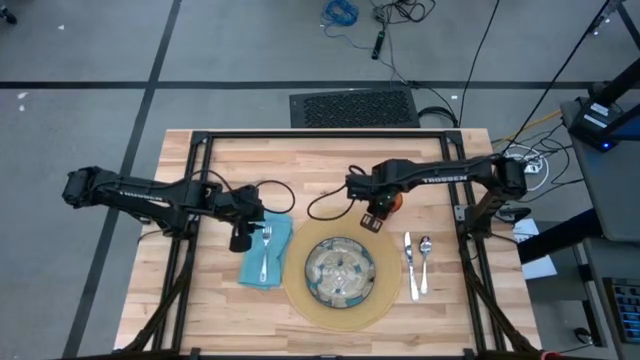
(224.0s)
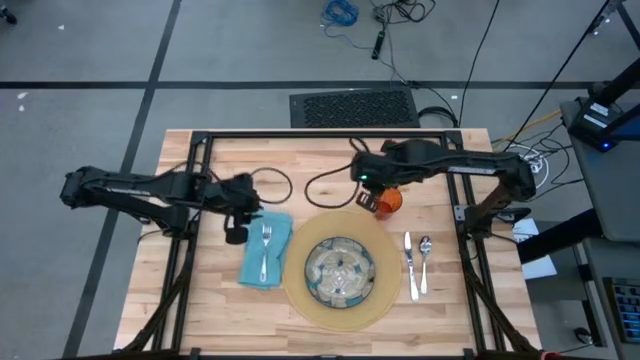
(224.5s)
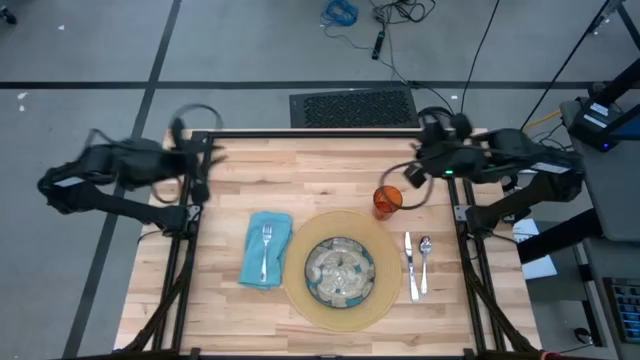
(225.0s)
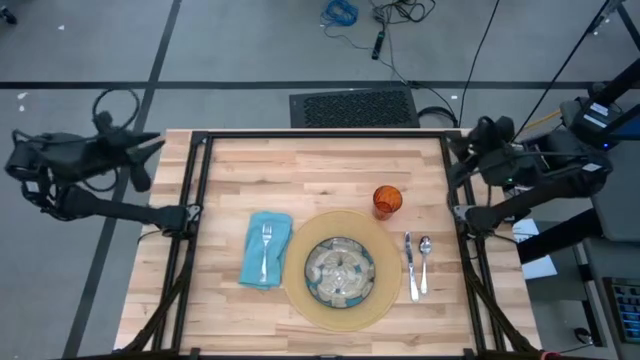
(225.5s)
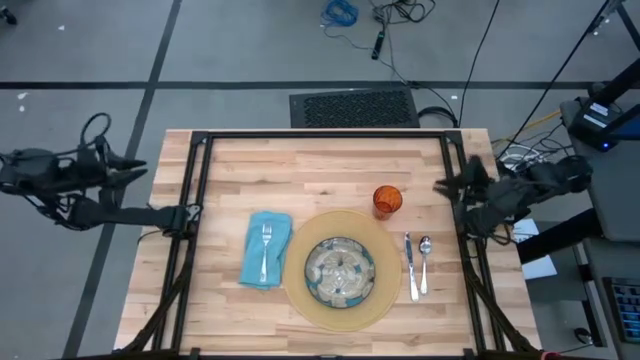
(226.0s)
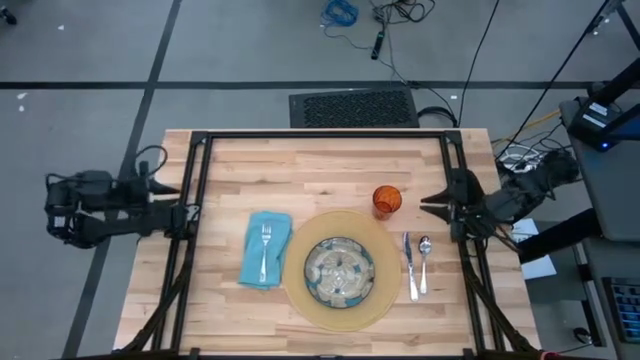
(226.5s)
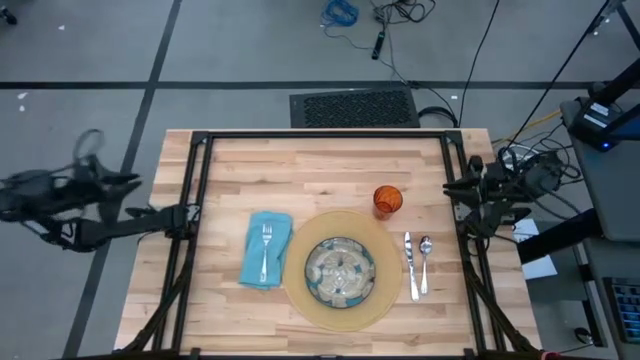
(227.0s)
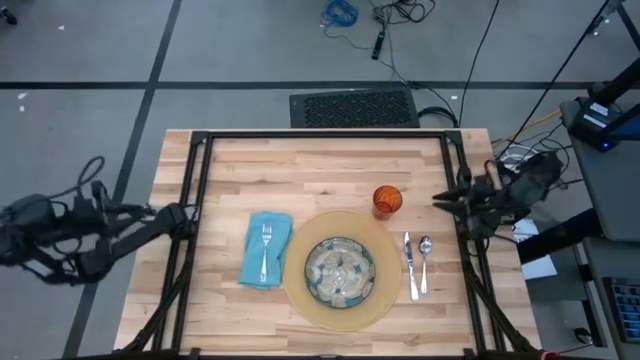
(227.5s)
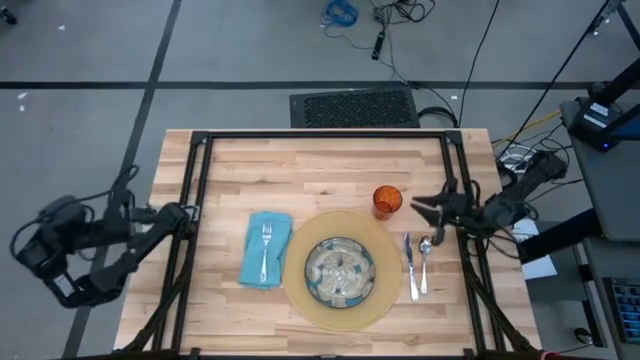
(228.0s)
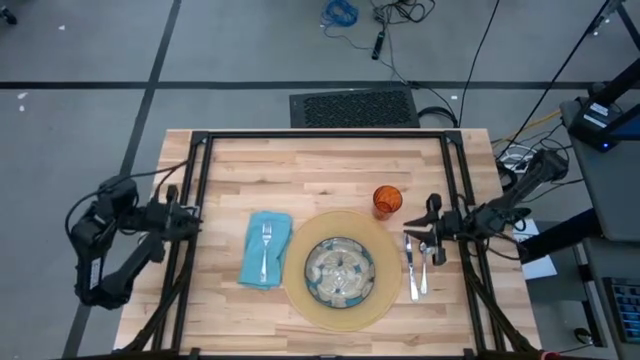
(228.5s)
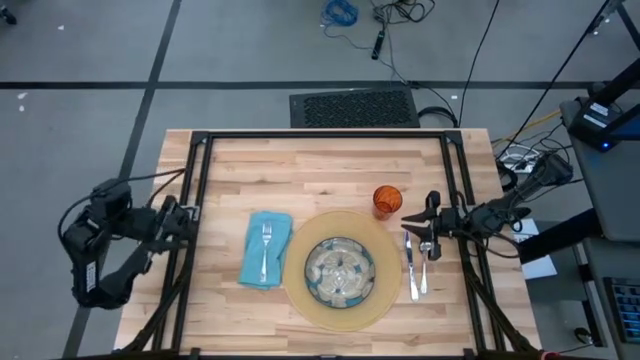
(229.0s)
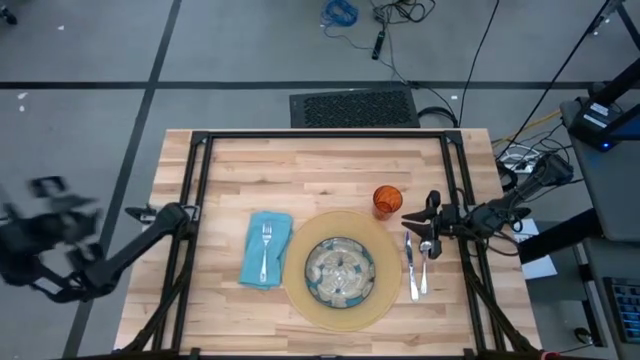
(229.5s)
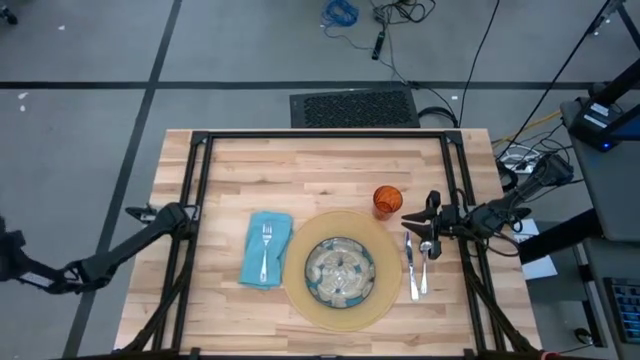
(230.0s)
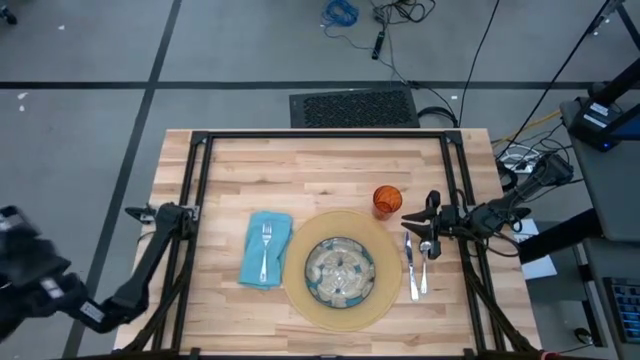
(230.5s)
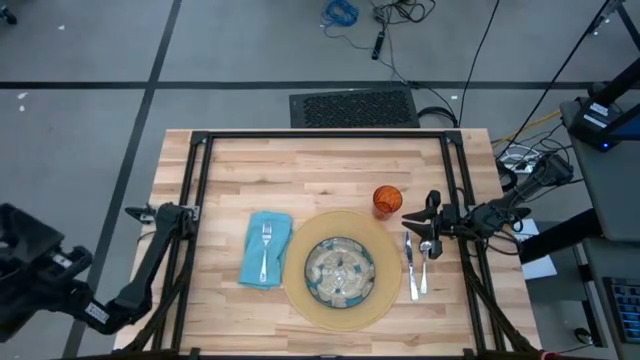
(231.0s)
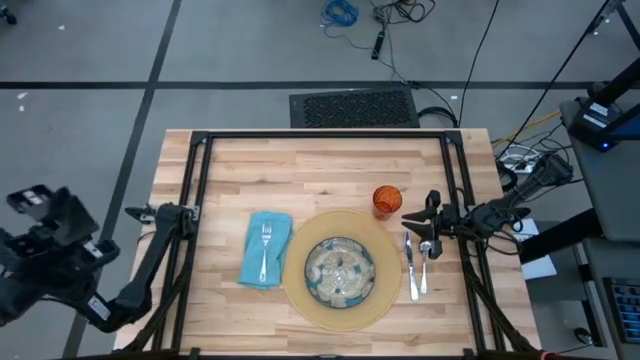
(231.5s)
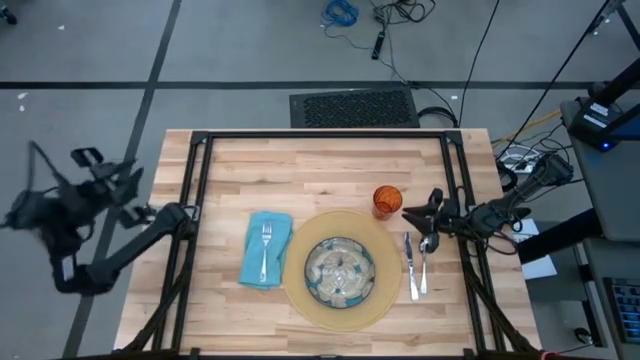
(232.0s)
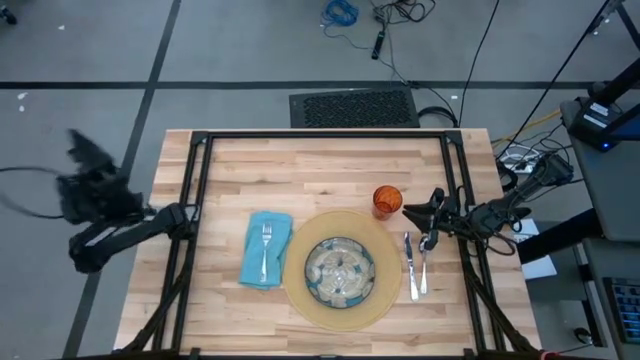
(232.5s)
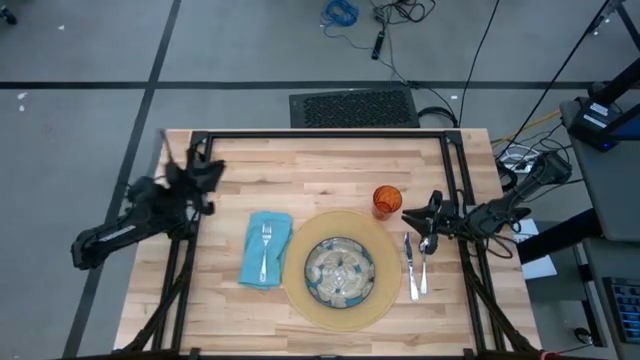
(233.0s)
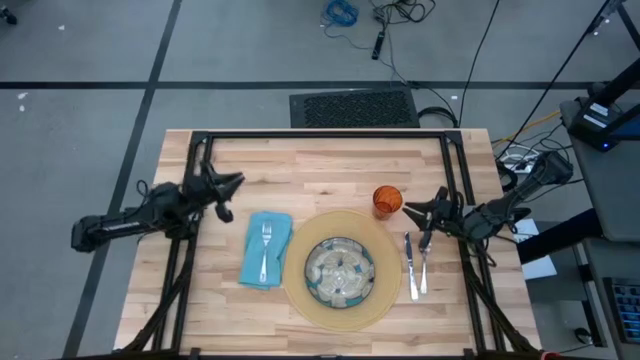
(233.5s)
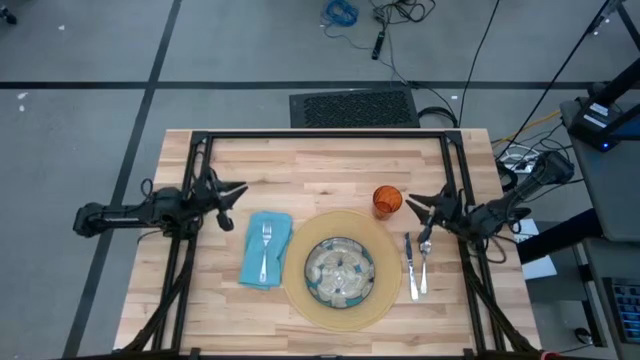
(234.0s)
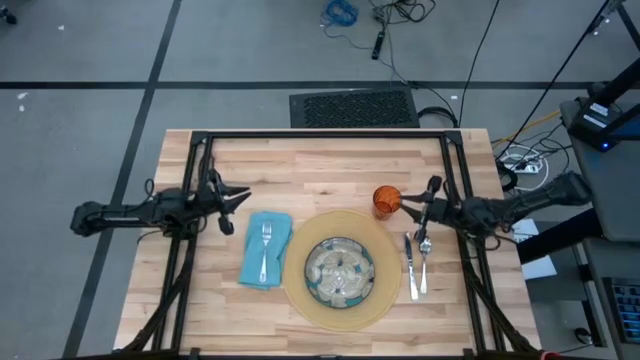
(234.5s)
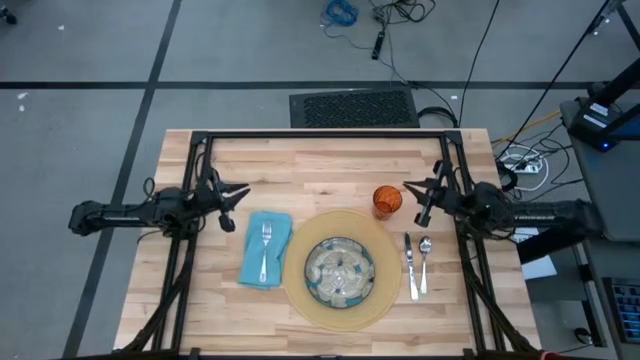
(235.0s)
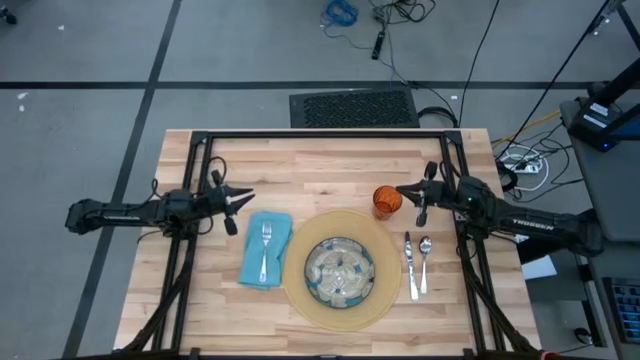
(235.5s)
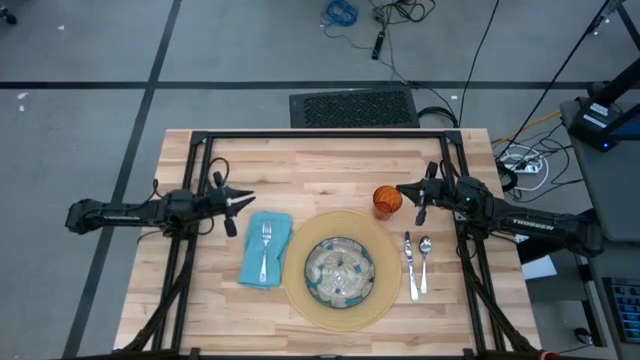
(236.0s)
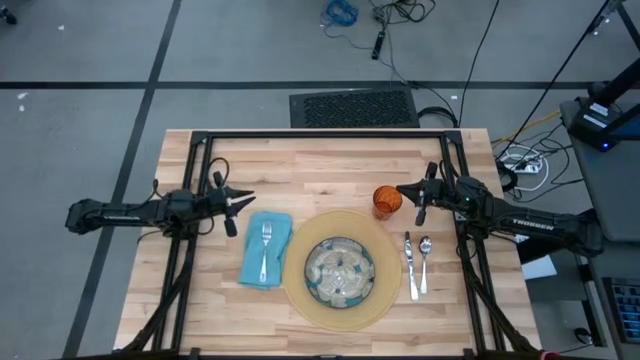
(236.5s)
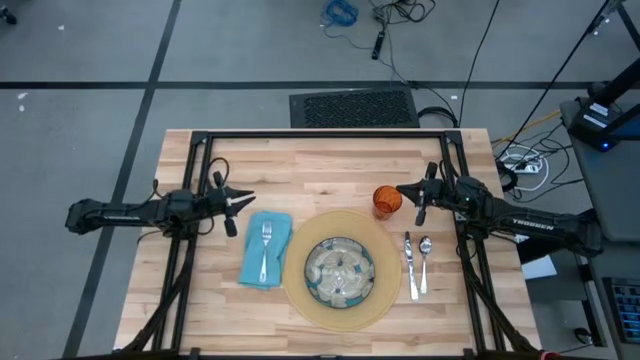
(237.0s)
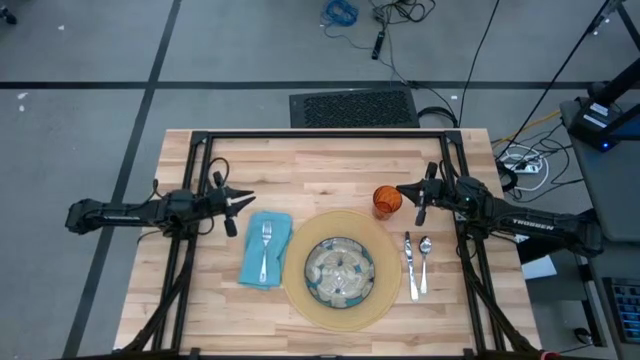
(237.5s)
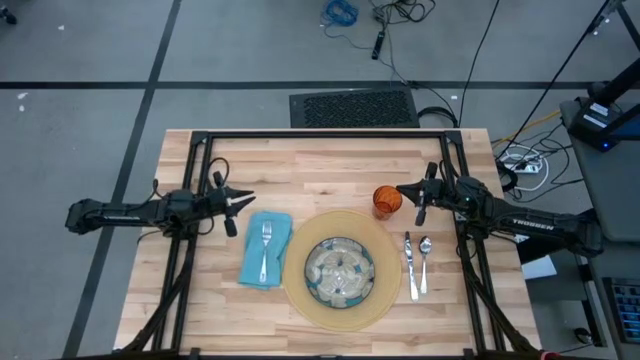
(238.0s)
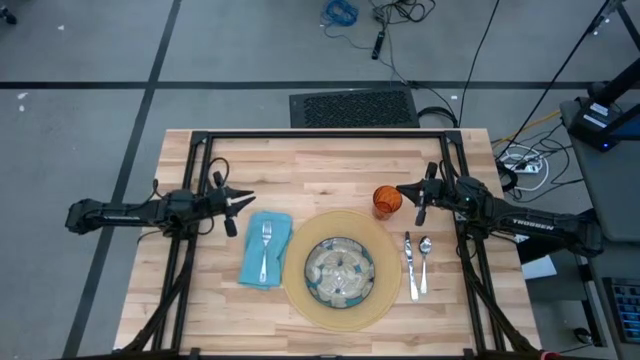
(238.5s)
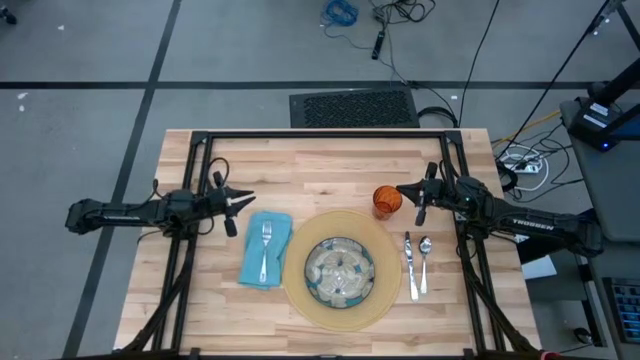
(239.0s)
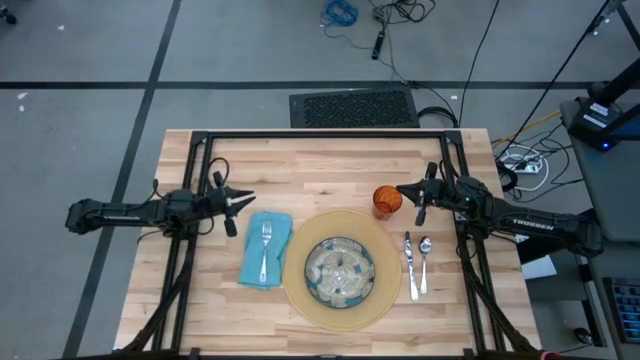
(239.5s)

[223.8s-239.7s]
Task: Set table place
Return to Home Position
